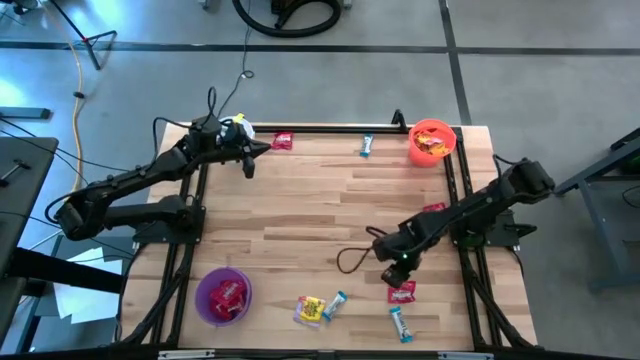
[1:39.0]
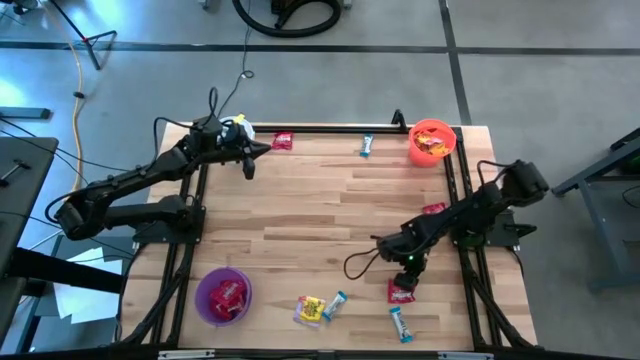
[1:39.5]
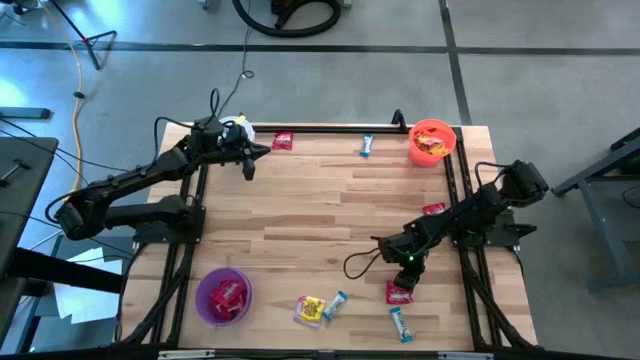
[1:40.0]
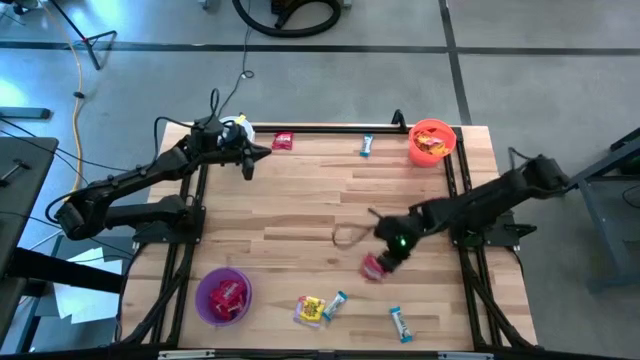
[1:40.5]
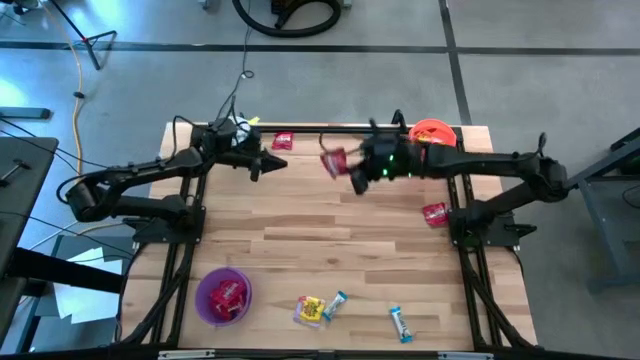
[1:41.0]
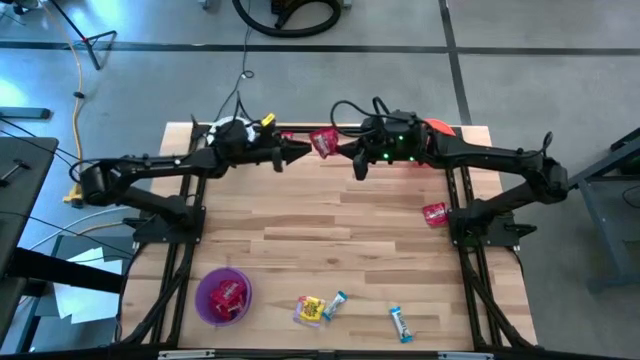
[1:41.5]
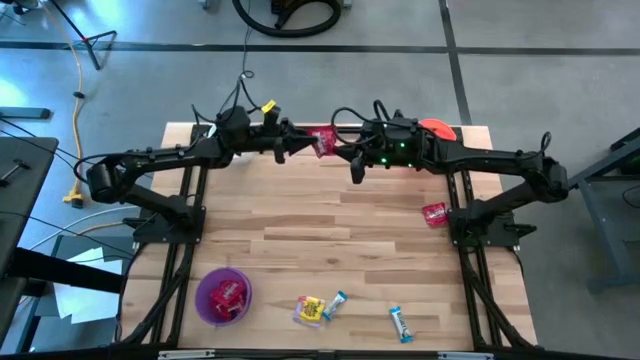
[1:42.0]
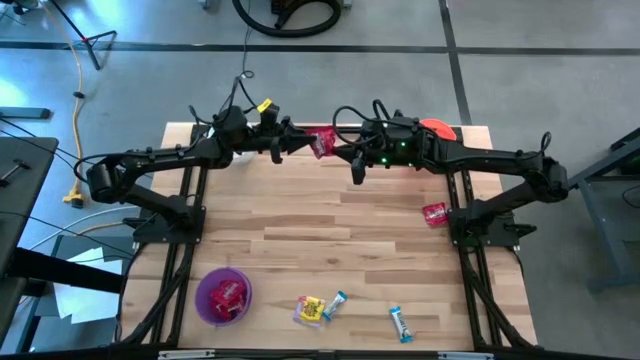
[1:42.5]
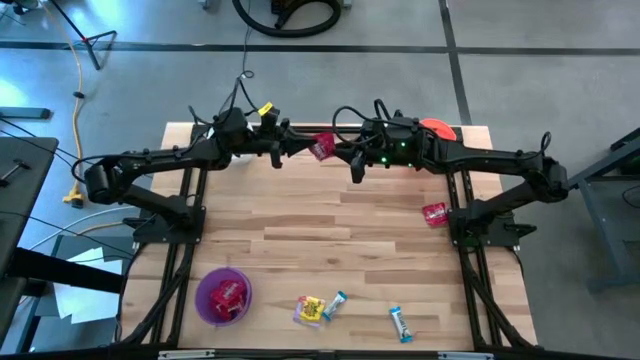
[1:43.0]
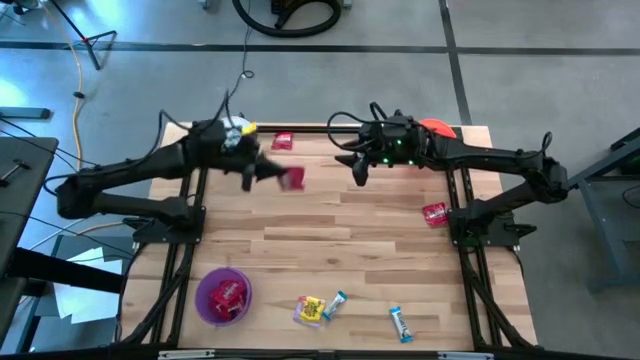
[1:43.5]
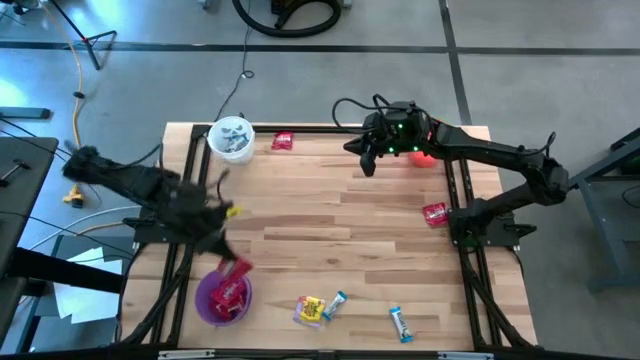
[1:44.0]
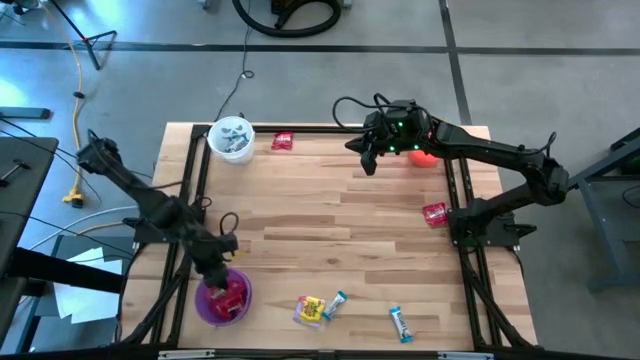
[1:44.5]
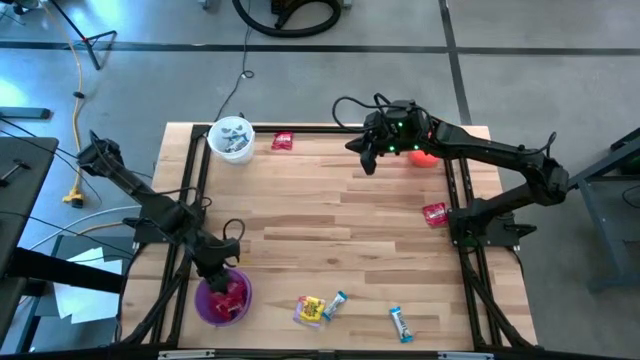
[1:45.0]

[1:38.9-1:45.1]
Task: Sort candy
Put the red candy into the purple bucket

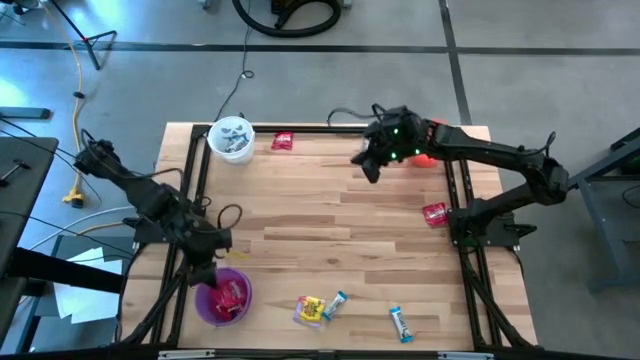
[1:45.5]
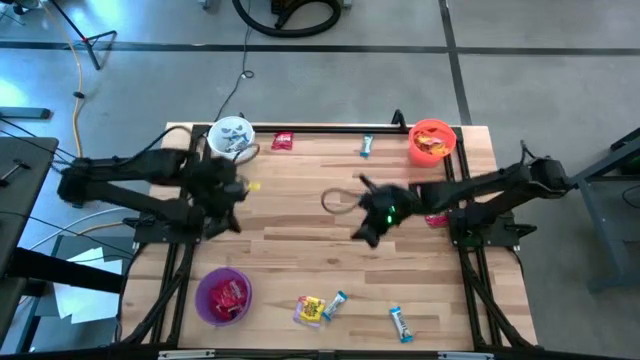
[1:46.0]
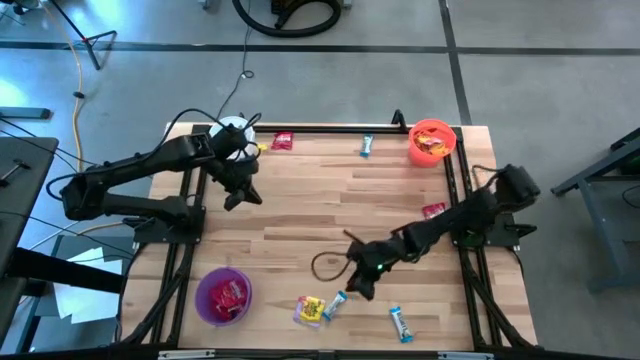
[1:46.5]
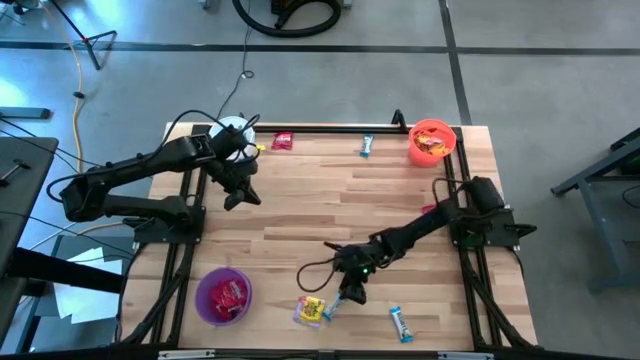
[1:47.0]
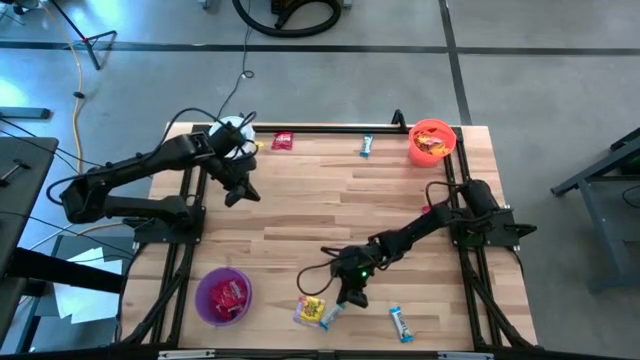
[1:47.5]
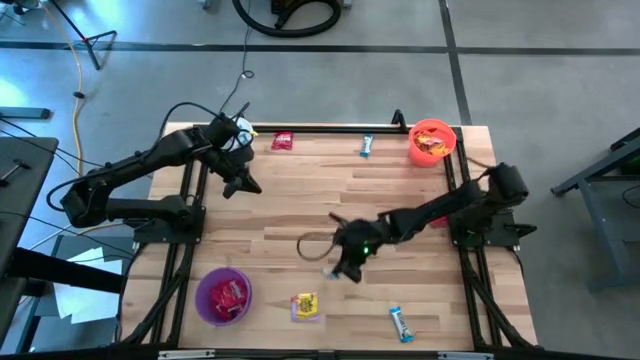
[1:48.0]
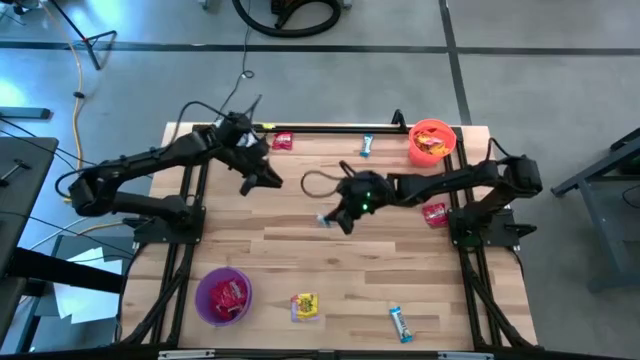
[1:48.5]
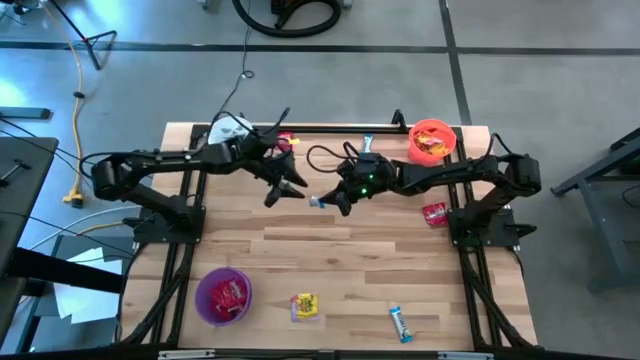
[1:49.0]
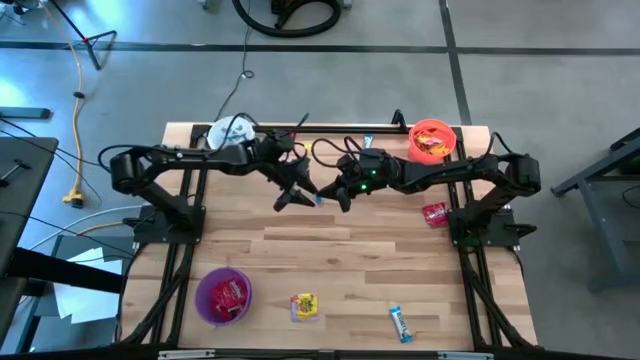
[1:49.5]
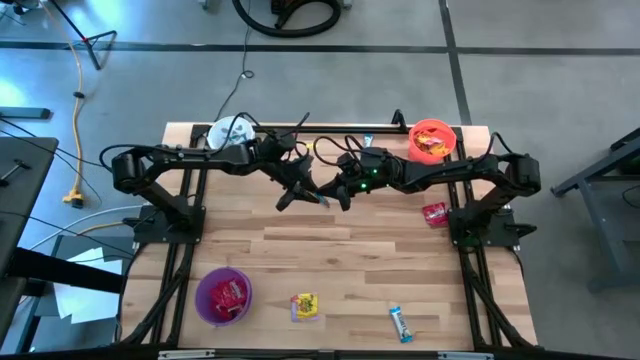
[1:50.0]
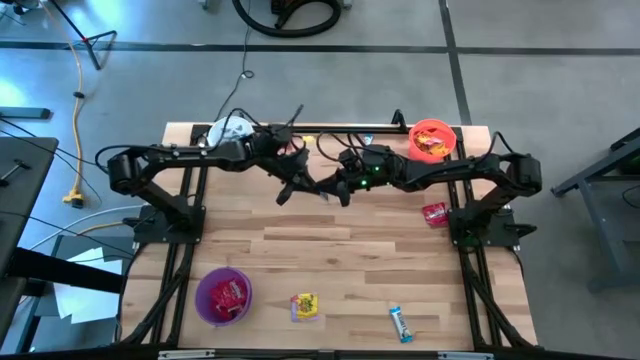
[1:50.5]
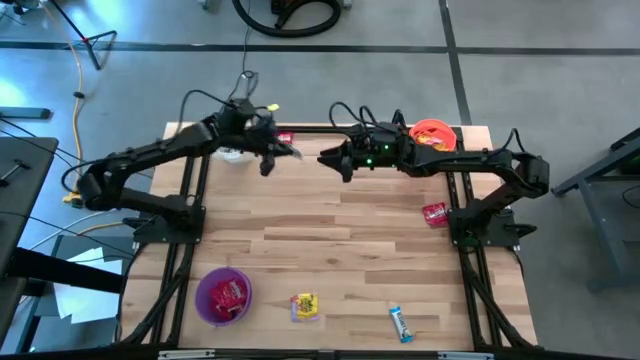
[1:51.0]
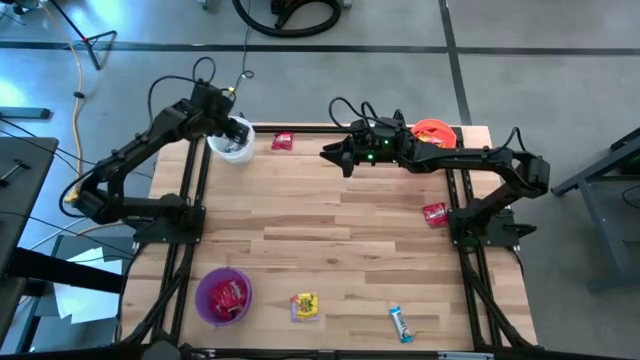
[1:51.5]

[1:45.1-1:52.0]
Put the white candy into the white bucket

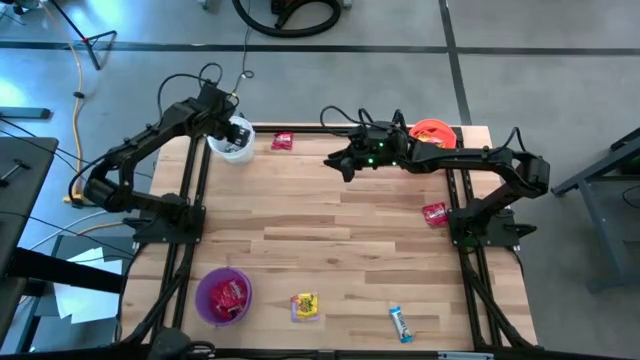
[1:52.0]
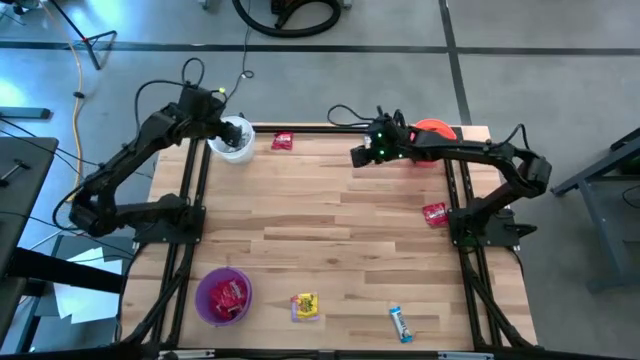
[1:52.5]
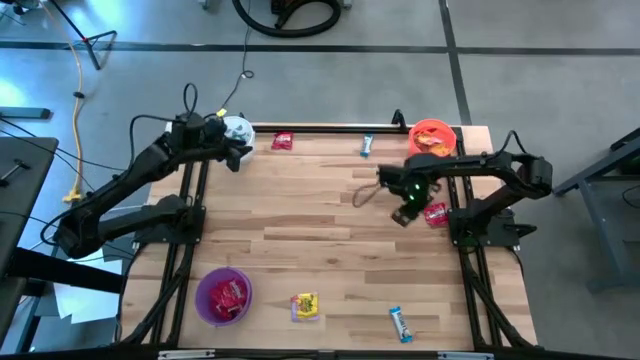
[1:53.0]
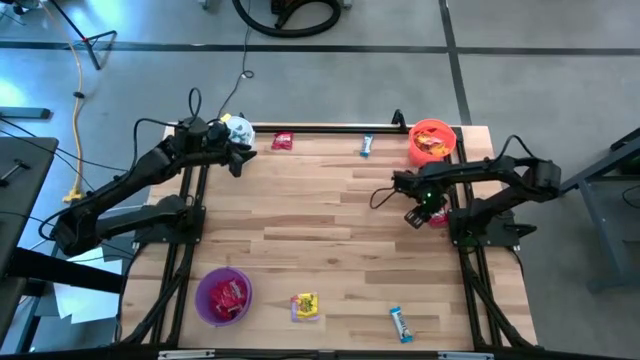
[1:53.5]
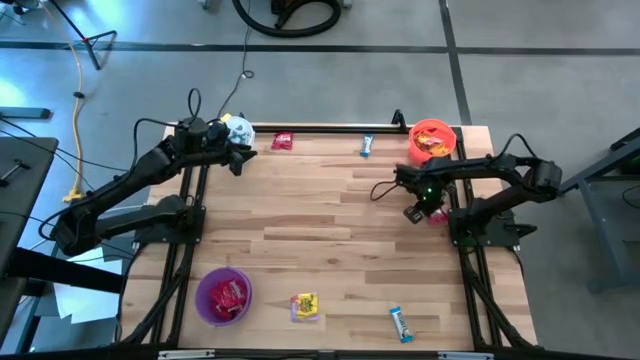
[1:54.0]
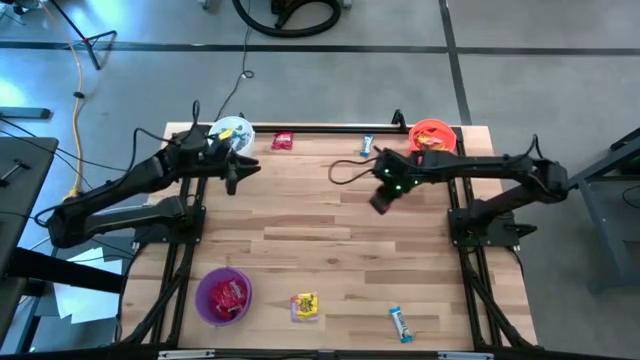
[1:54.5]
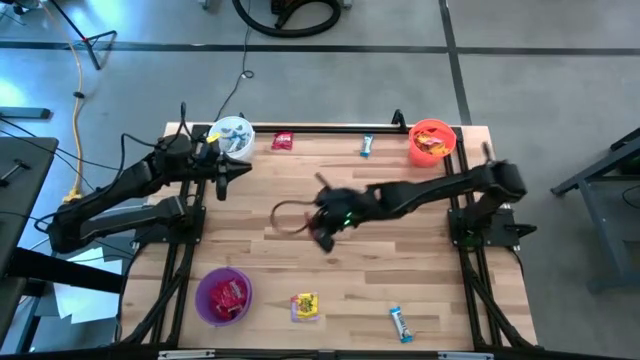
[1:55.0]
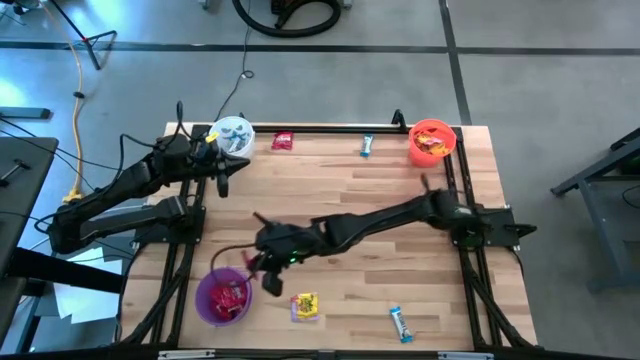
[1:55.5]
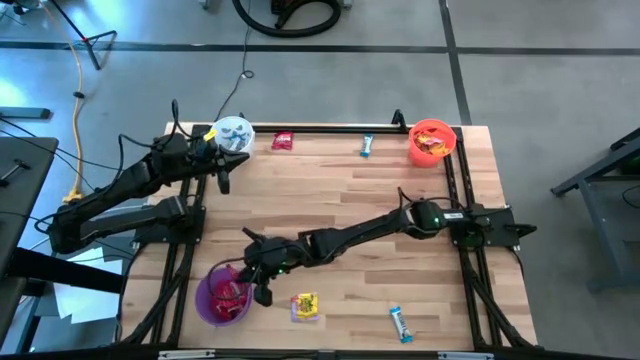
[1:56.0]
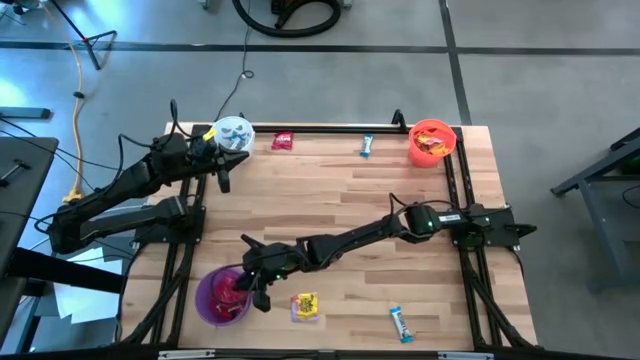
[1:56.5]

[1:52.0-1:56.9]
Put the red candy into the purple bucket

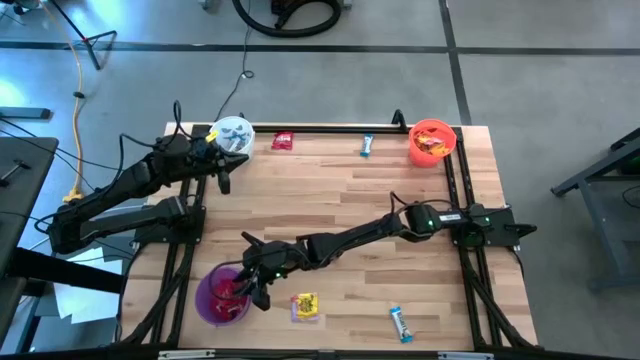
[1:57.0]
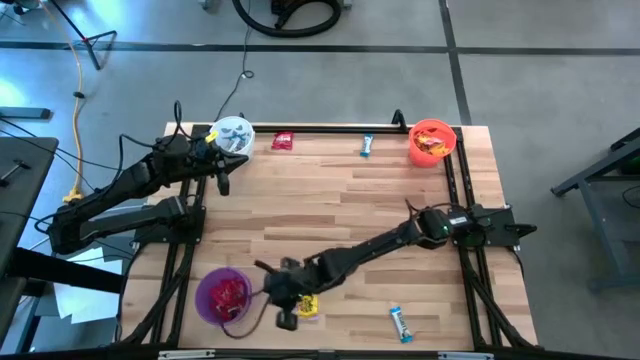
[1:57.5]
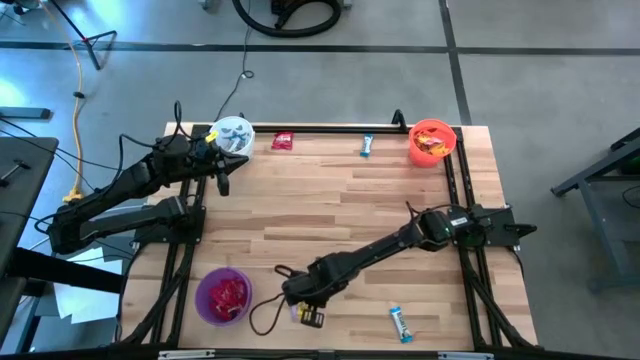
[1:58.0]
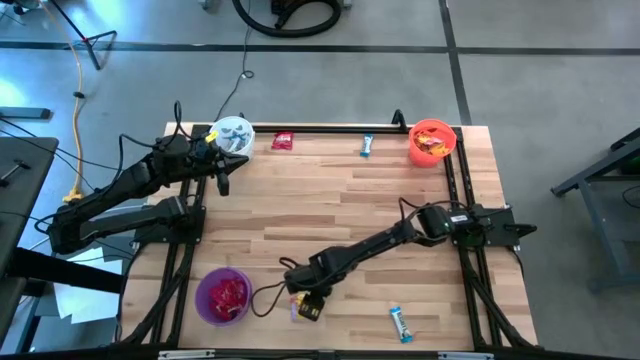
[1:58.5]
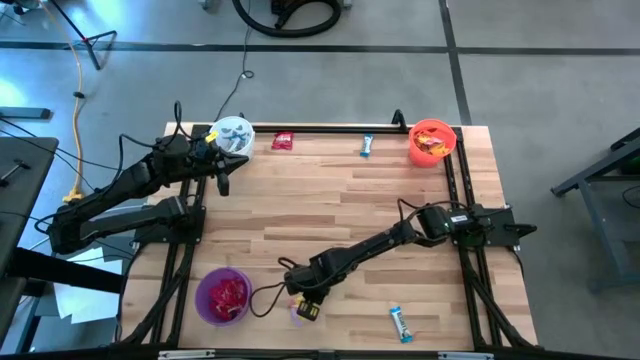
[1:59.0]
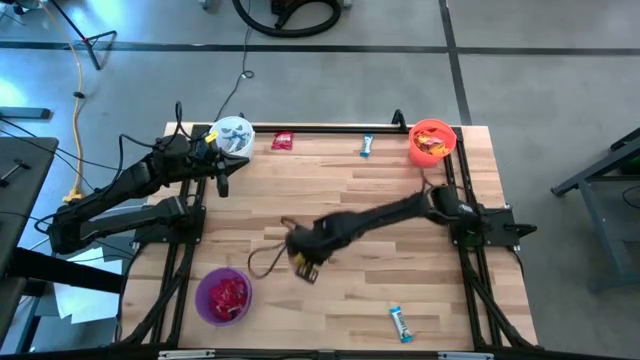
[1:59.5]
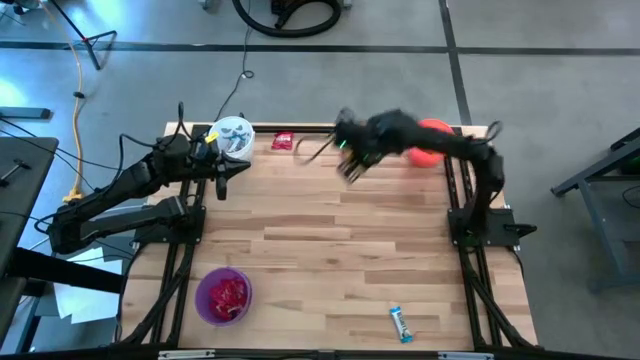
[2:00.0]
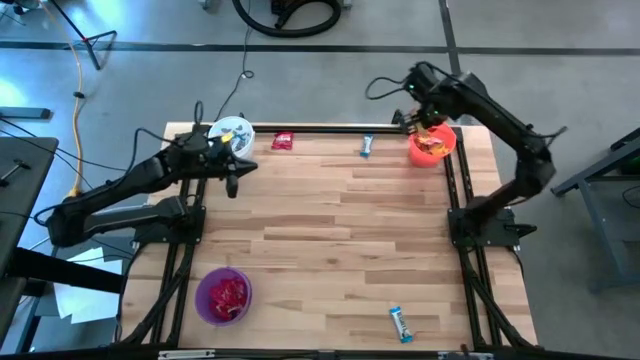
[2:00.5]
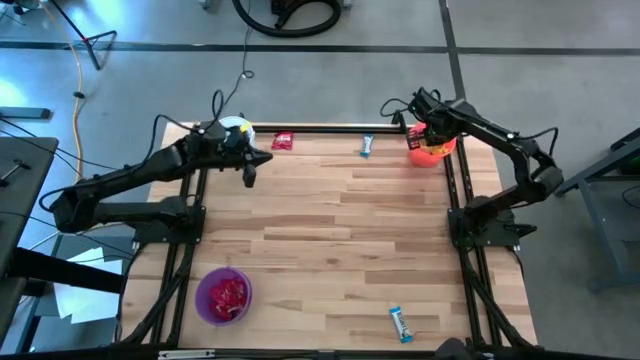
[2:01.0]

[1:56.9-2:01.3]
Put the yellow candy into the orange bucket
